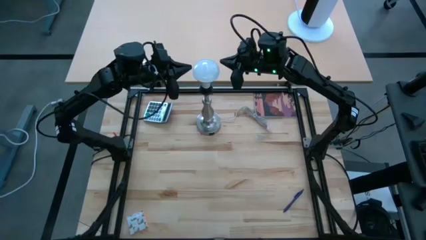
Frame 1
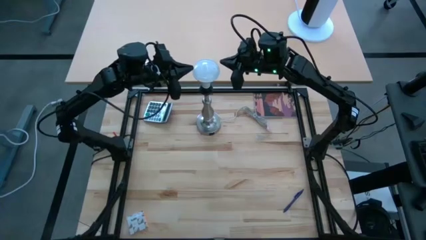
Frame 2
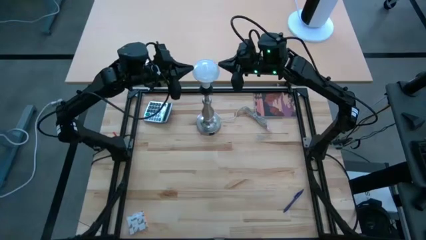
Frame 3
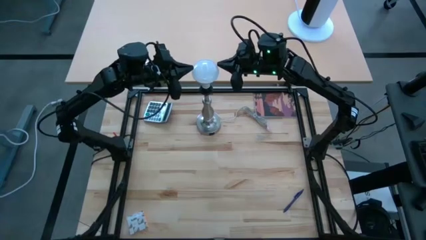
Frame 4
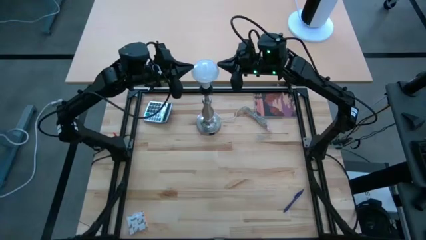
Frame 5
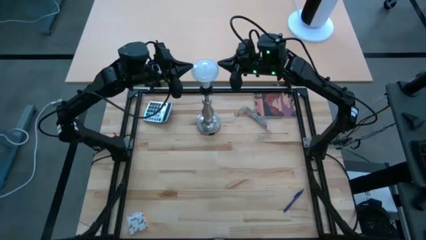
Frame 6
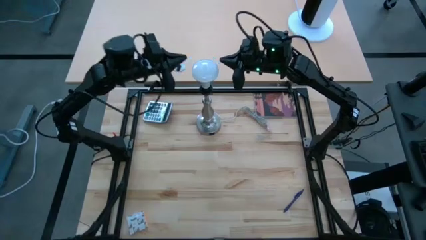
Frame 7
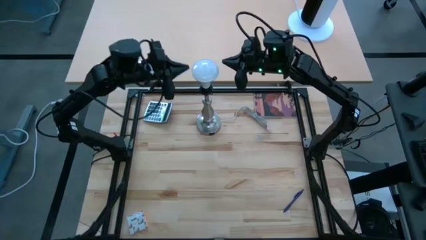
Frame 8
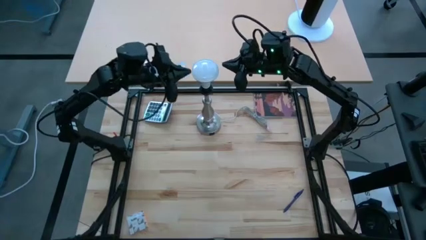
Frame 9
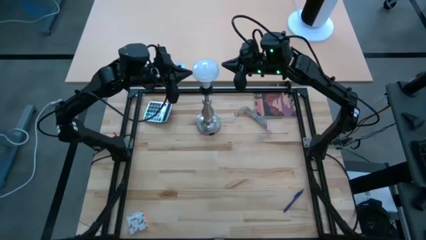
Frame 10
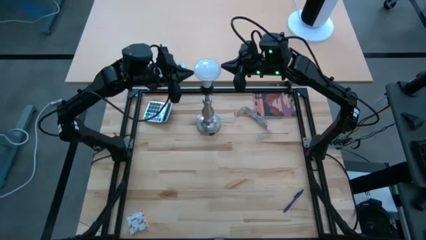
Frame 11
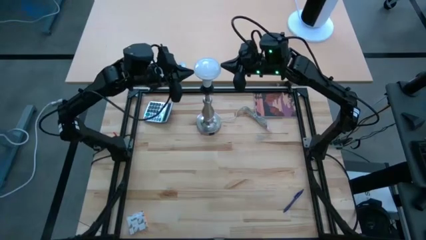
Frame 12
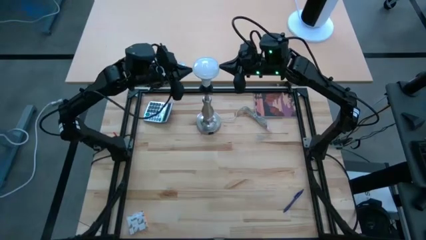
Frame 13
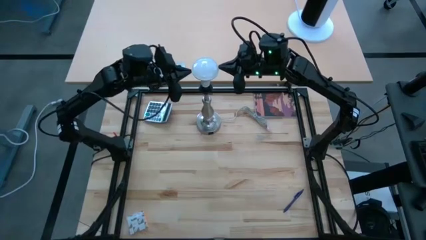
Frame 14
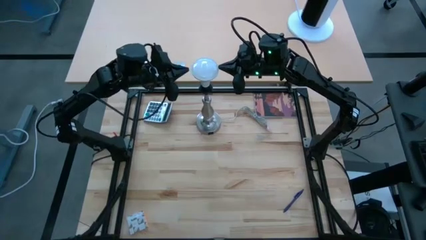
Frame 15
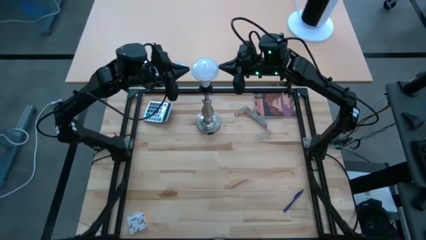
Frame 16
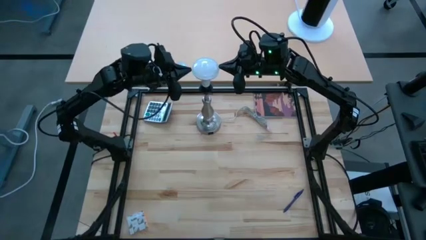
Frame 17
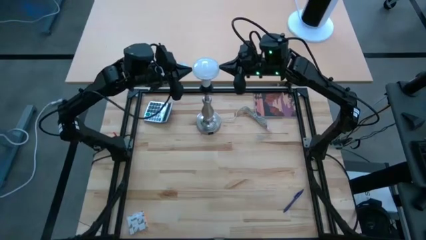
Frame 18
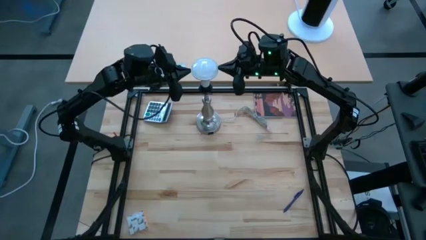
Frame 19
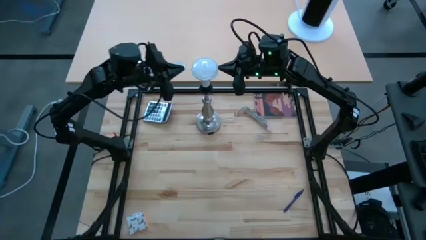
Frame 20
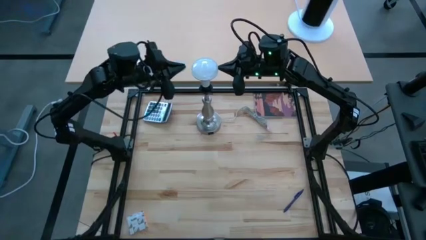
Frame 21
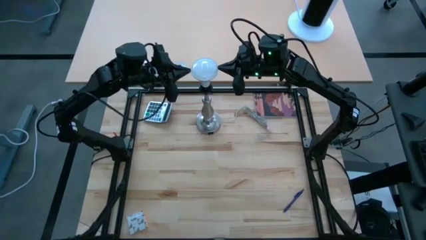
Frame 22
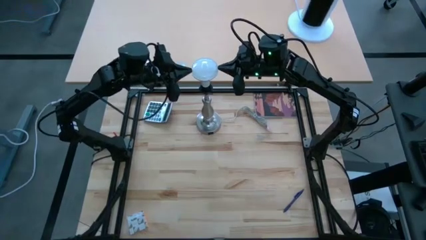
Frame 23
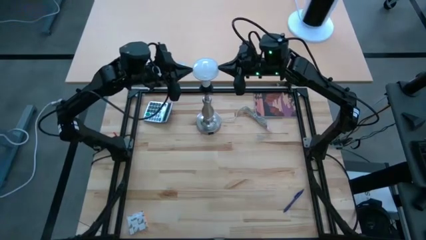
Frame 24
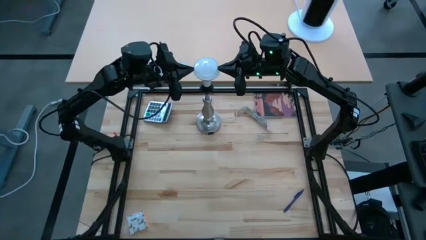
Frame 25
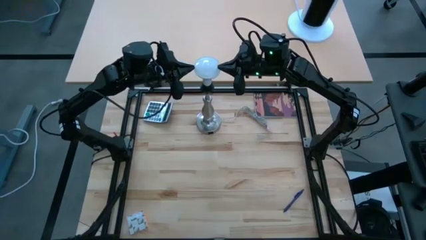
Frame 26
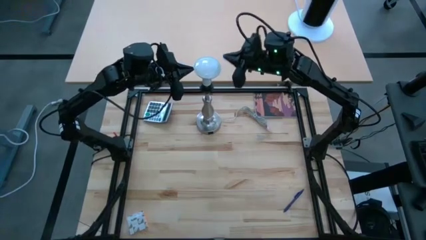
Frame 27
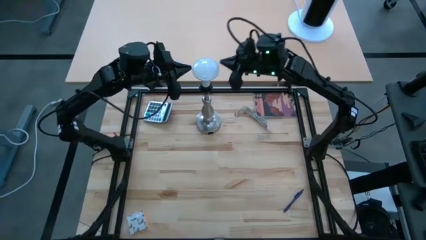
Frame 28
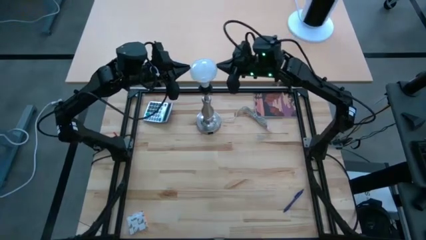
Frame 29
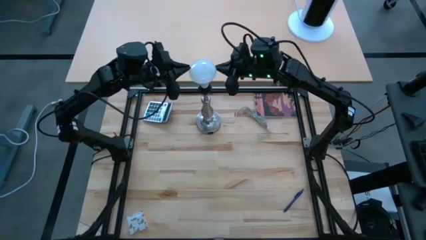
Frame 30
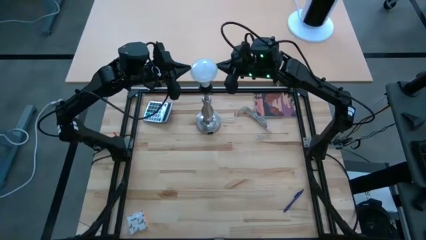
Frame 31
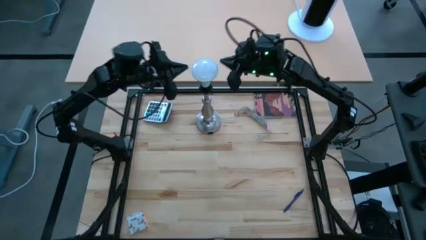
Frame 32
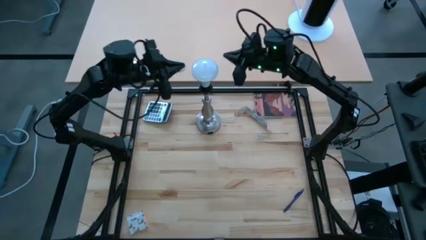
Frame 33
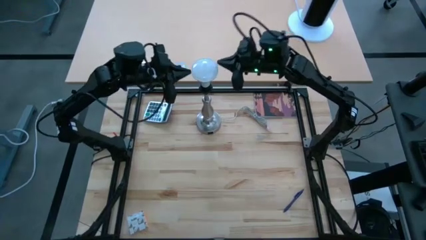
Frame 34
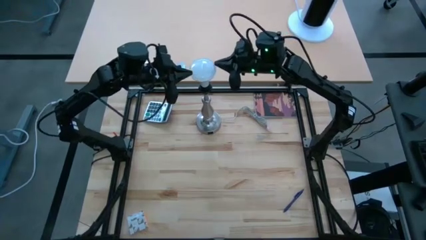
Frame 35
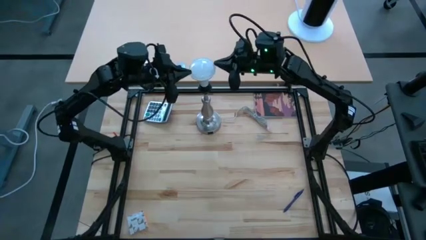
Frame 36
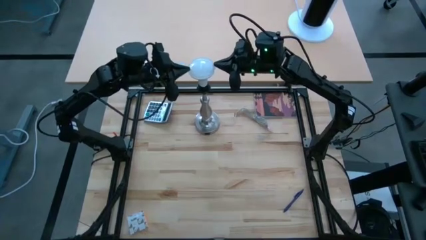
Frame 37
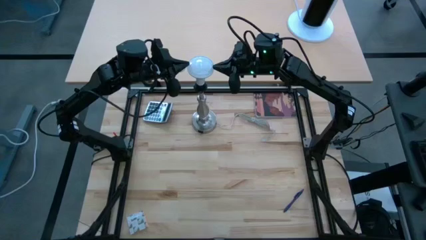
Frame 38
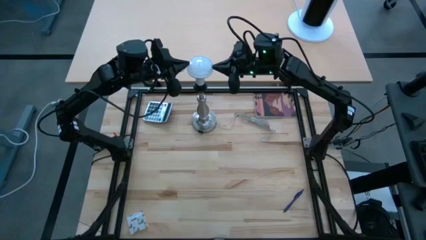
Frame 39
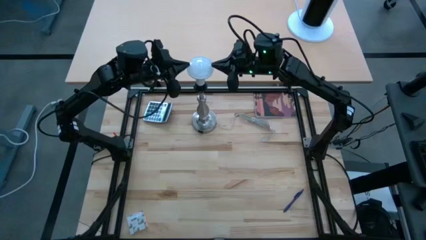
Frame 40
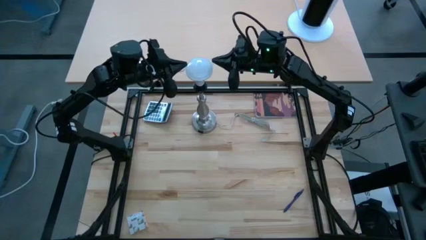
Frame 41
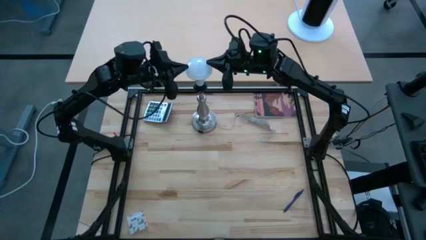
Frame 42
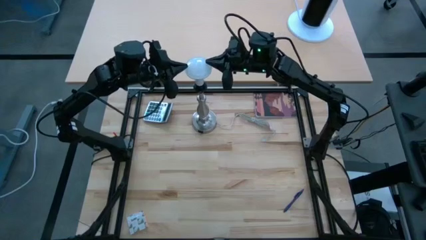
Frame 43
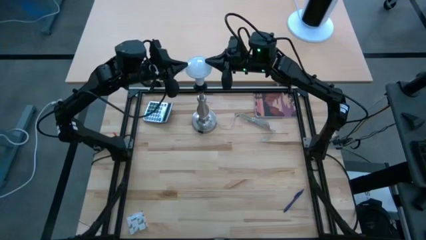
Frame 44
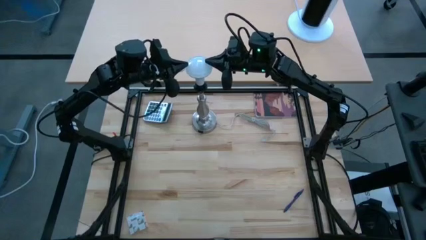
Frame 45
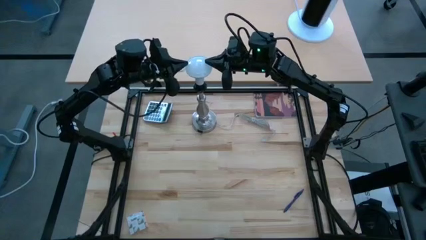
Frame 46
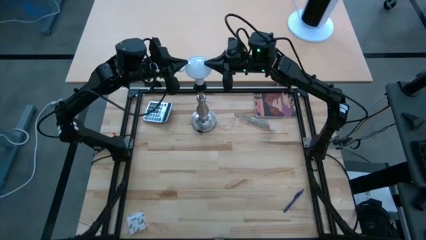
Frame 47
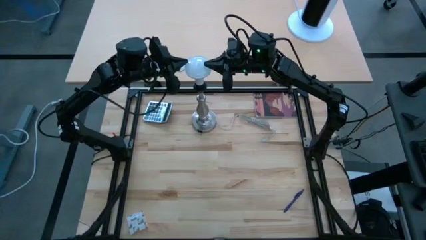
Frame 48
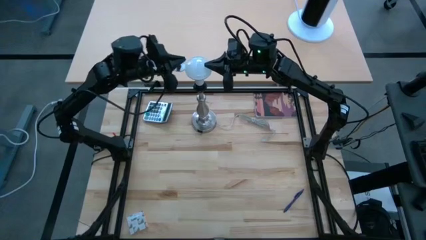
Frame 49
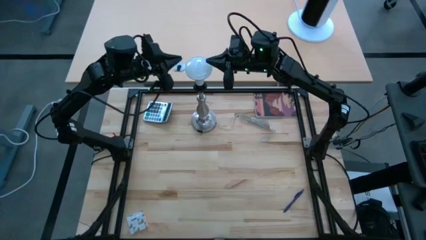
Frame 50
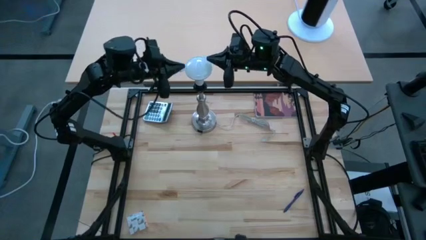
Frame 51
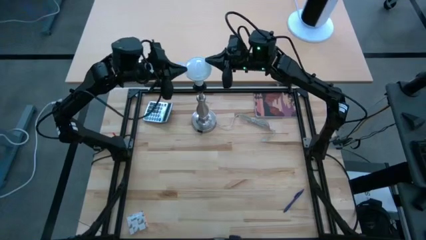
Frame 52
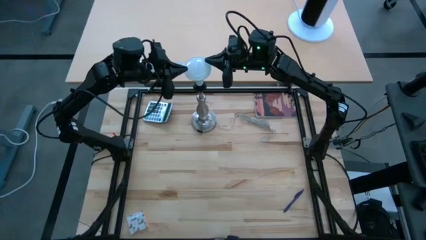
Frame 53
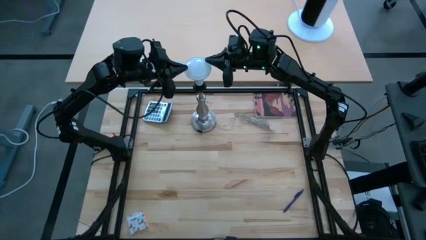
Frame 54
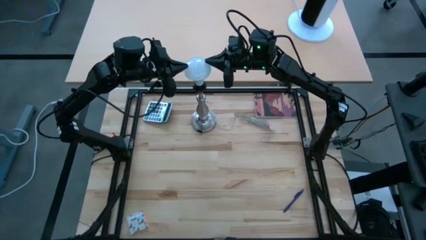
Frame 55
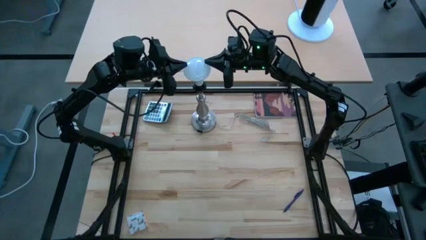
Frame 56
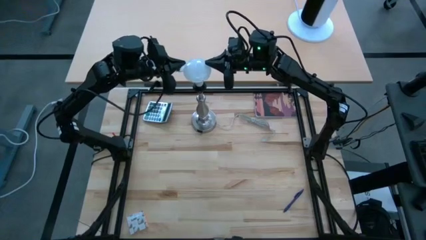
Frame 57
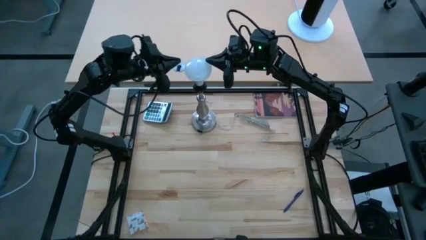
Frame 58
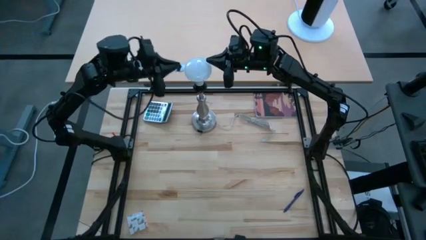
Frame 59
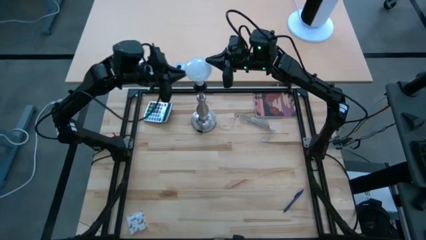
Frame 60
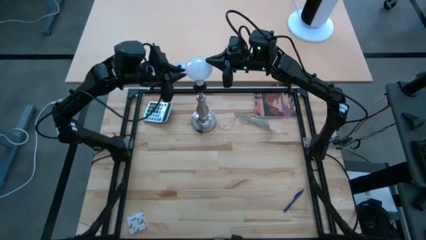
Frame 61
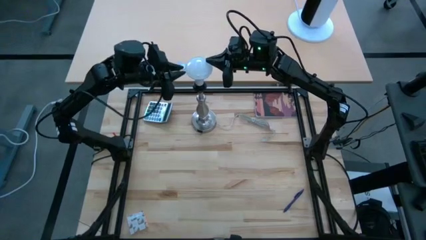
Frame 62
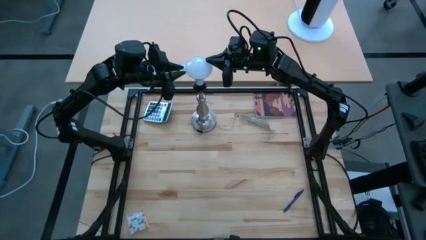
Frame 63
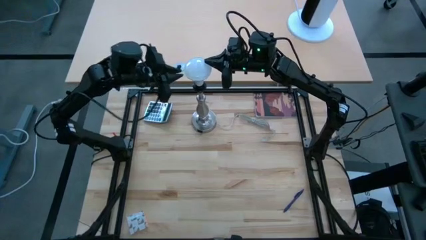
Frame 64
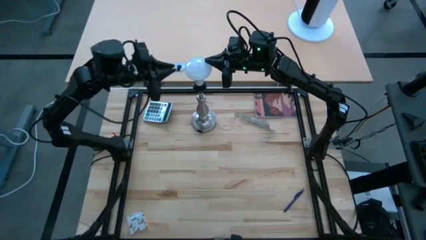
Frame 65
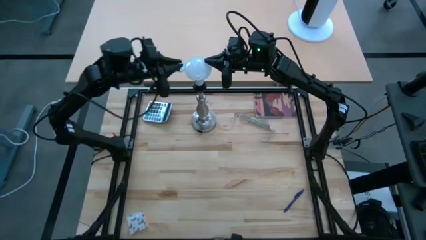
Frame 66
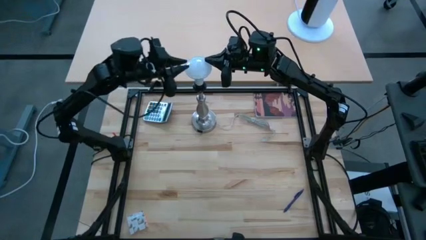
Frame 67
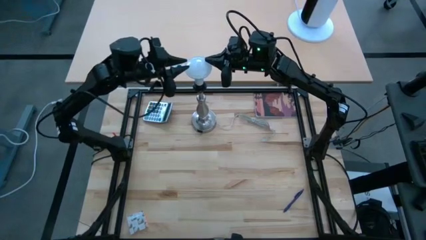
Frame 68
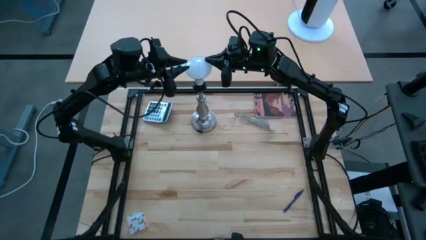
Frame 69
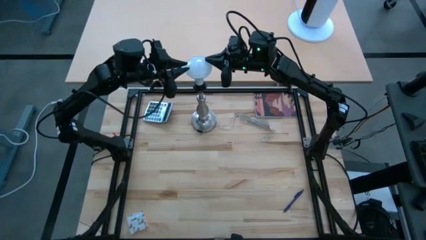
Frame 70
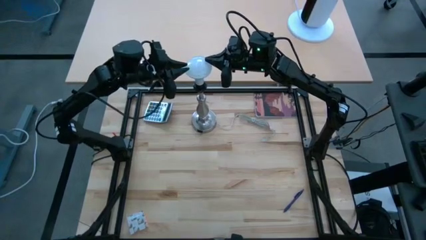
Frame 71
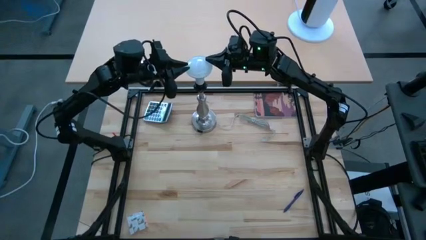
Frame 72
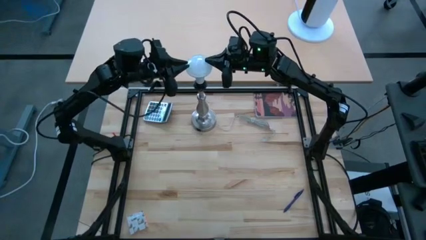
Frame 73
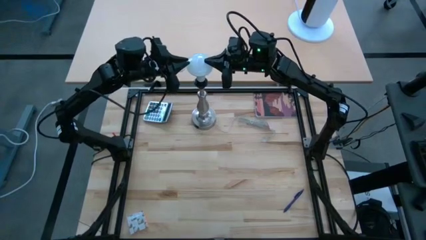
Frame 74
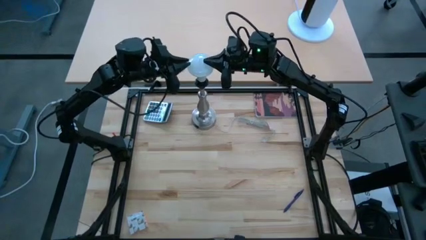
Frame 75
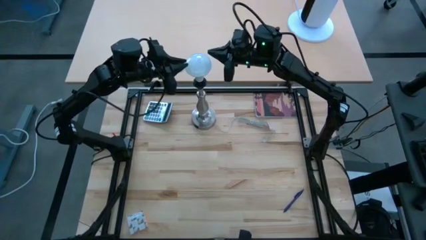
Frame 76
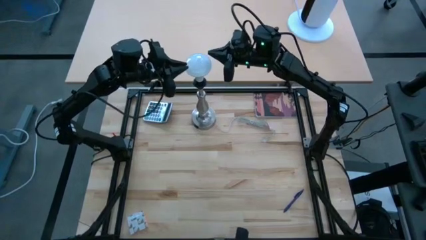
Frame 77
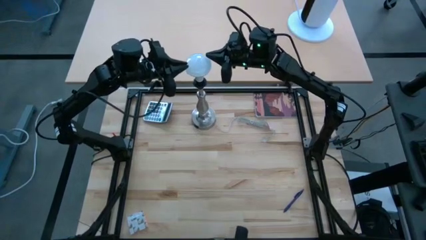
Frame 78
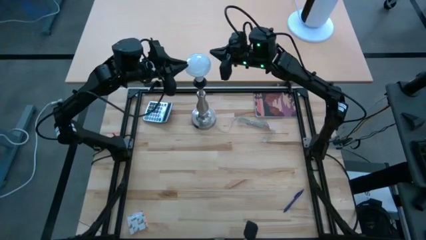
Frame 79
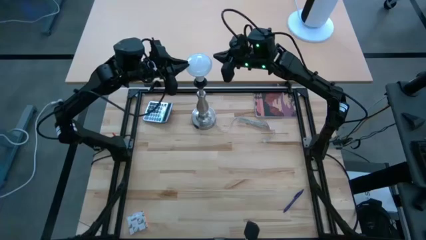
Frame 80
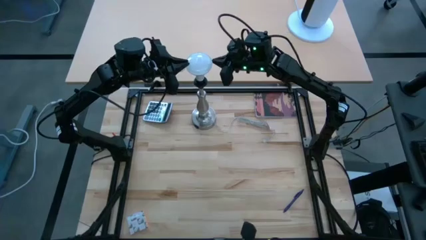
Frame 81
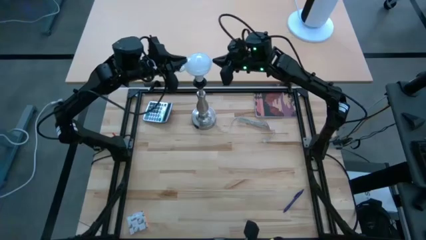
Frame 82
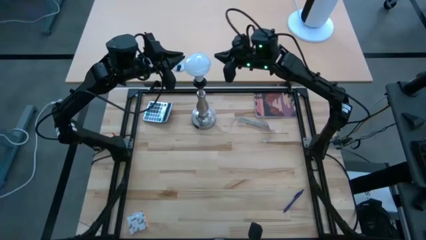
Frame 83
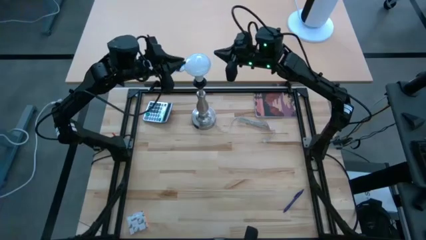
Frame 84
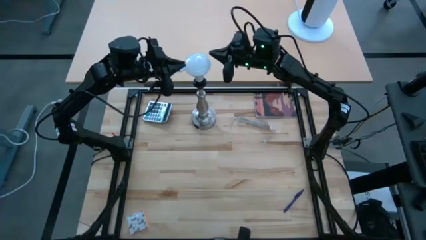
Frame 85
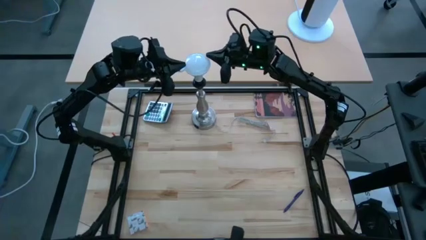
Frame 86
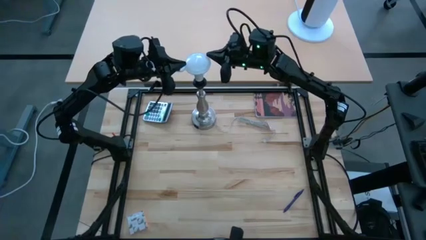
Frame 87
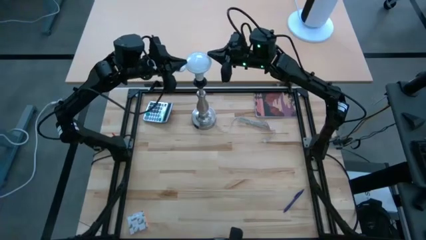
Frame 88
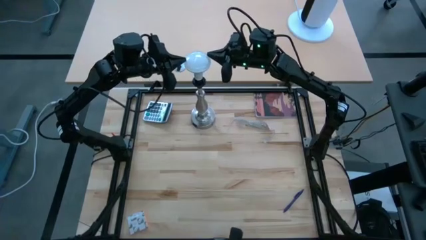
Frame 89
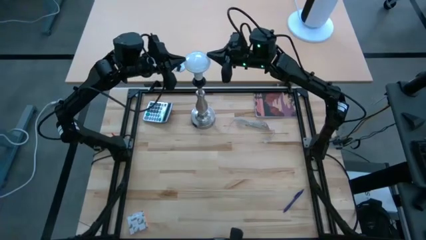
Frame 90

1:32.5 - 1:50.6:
Task: Screw lightbulb
Insert the lightbulb into the table lamp
